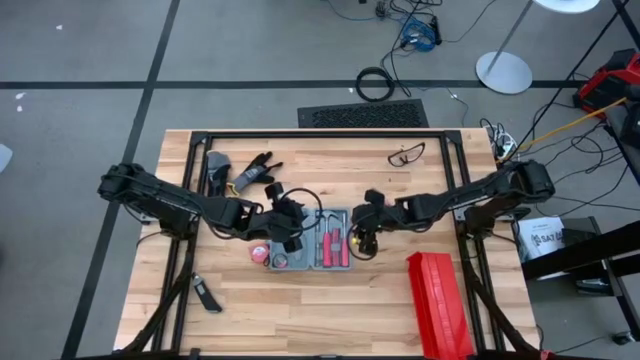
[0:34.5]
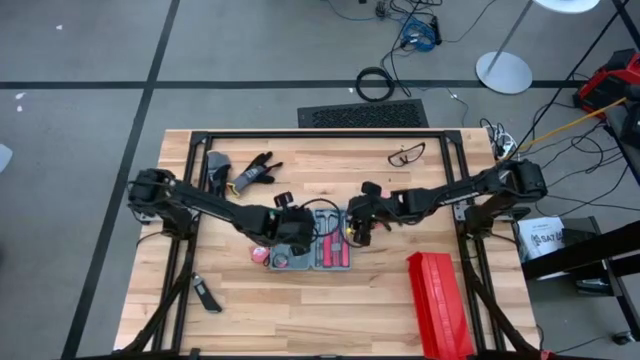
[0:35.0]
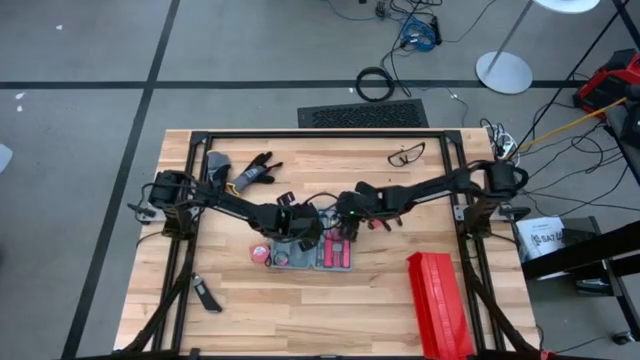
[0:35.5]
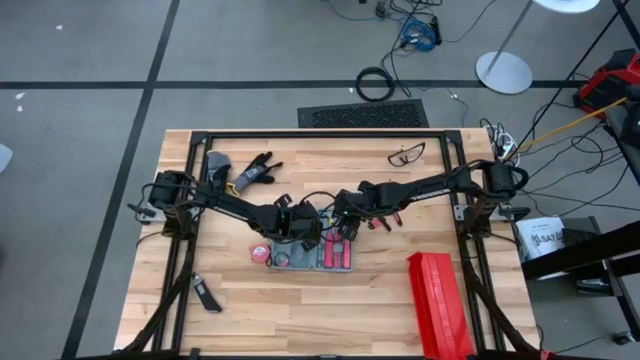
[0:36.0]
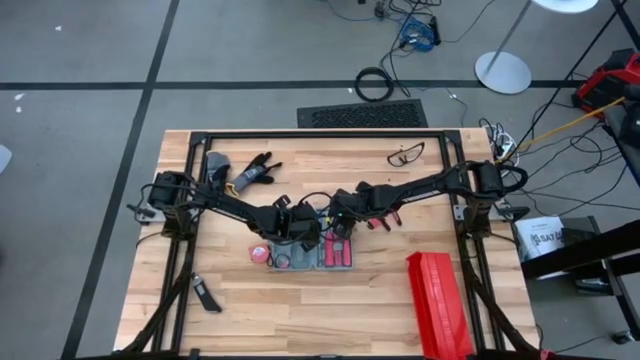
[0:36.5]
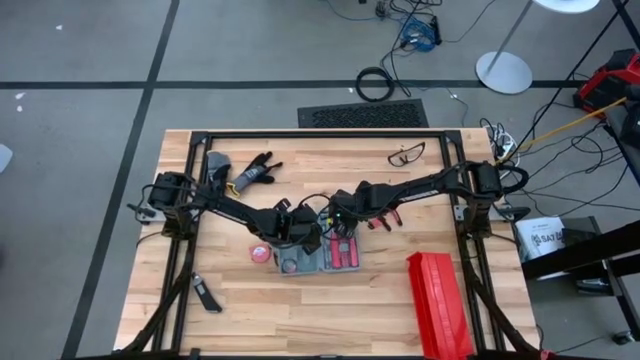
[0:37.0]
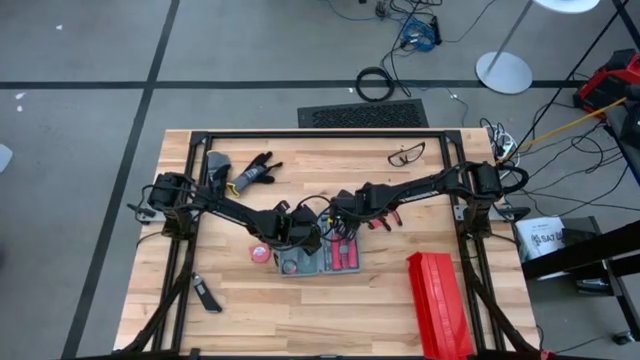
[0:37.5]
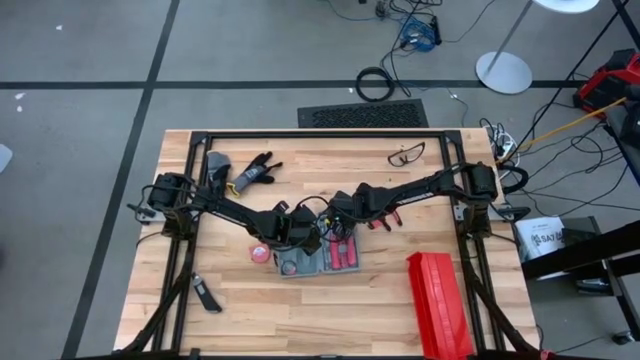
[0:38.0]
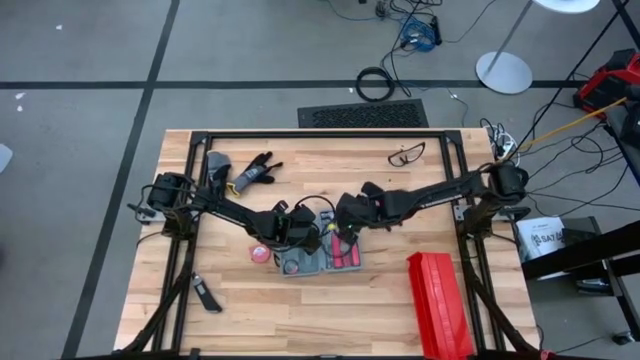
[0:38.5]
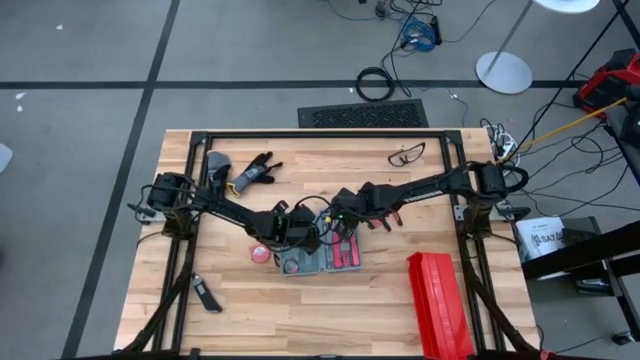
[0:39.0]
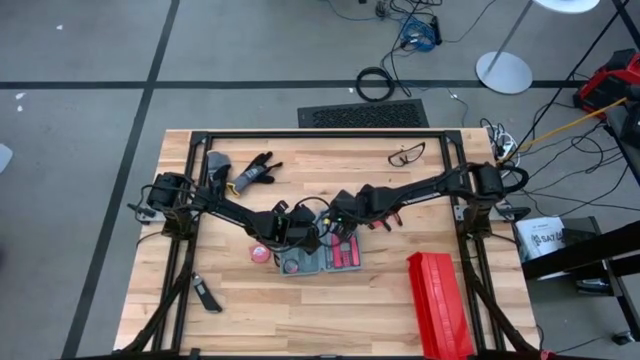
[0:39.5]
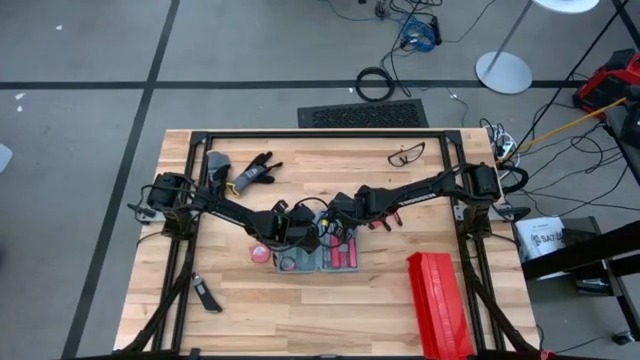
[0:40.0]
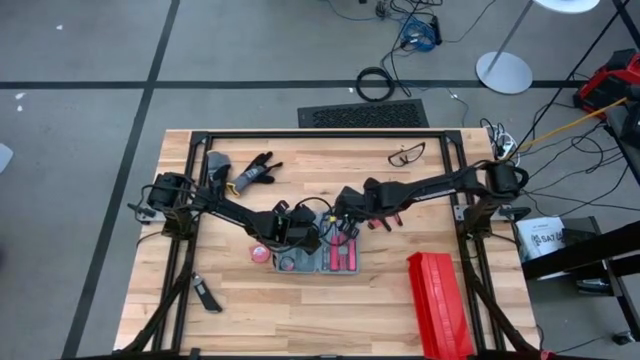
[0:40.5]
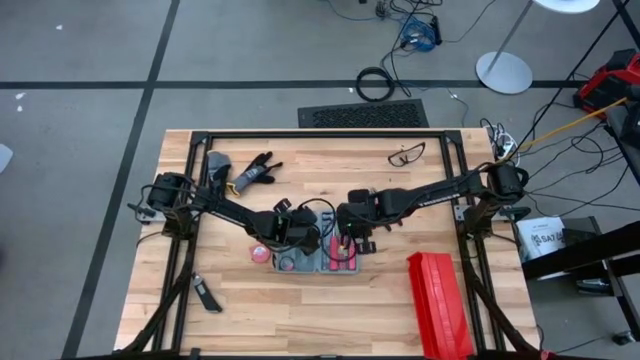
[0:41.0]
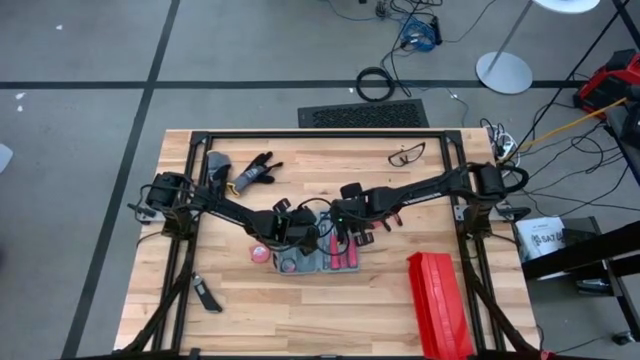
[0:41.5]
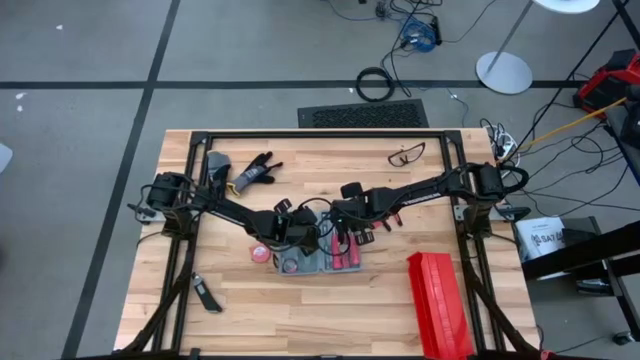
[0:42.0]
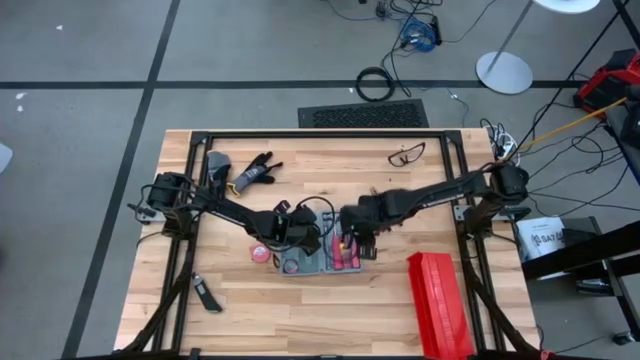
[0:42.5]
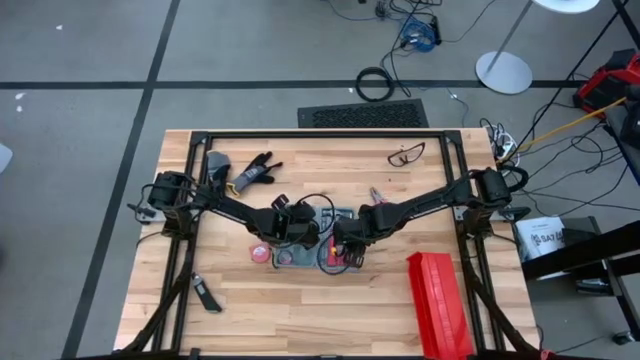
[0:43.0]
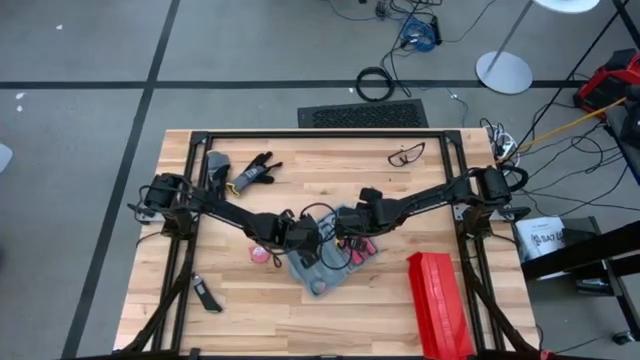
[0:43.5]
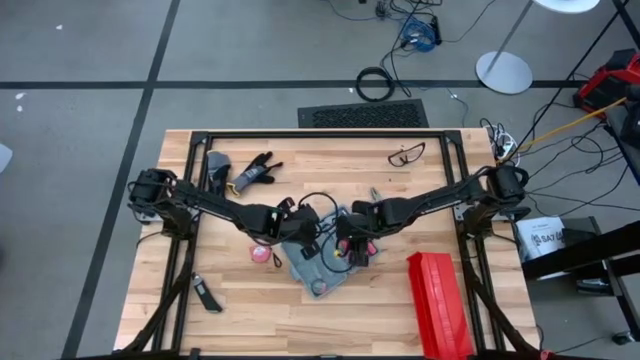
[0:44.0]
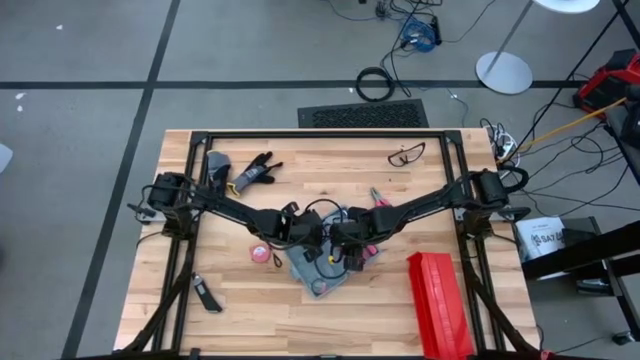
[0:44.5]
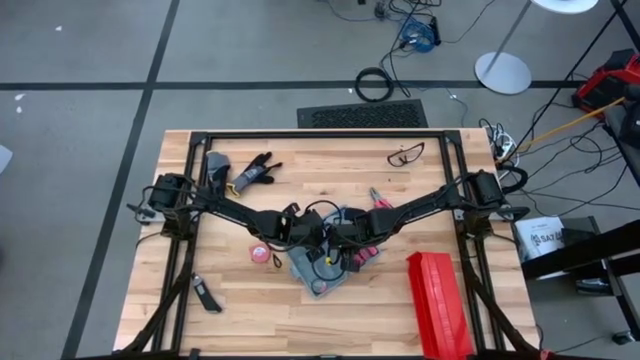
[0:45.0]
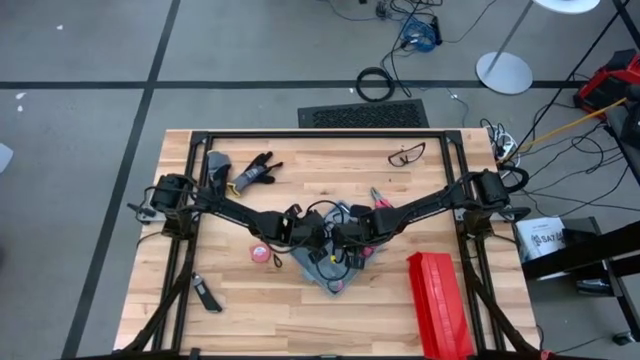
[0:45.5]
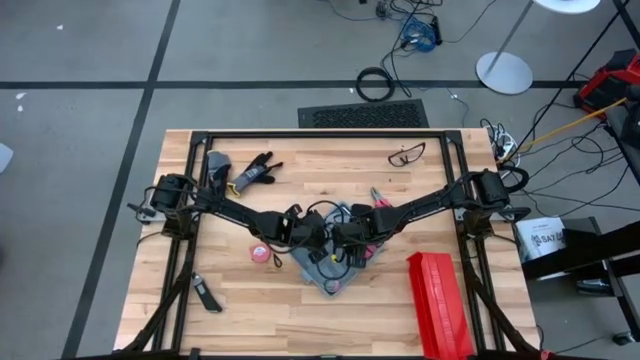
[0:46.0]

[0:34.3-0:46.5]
Task: prefit tool cases
Remove the red hammer from the gray prefit tools case

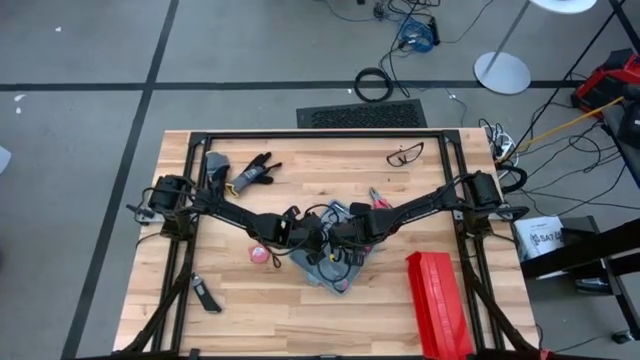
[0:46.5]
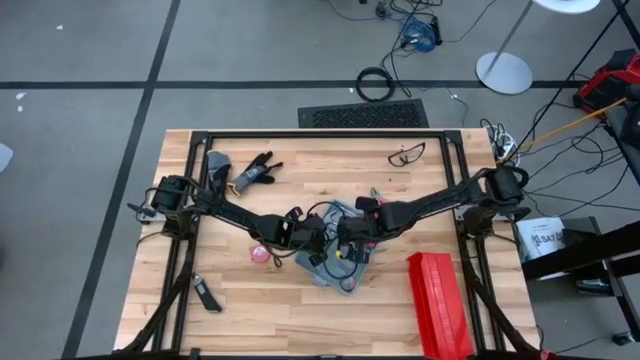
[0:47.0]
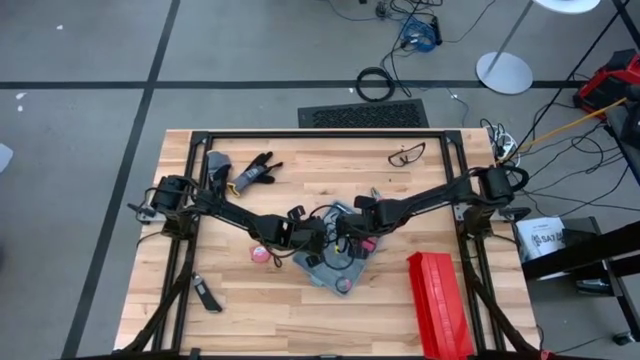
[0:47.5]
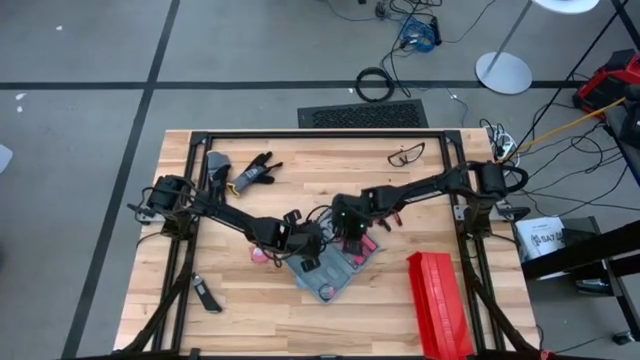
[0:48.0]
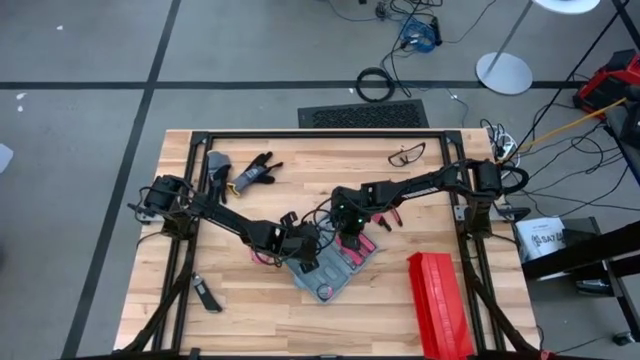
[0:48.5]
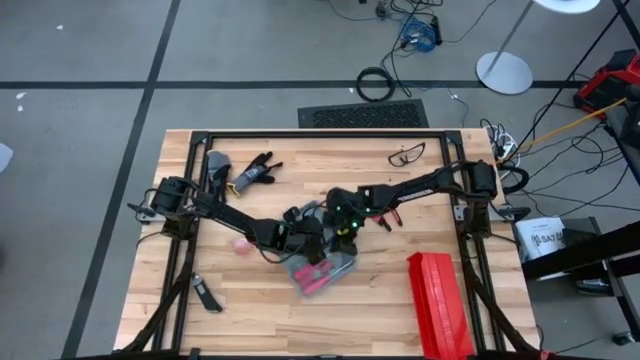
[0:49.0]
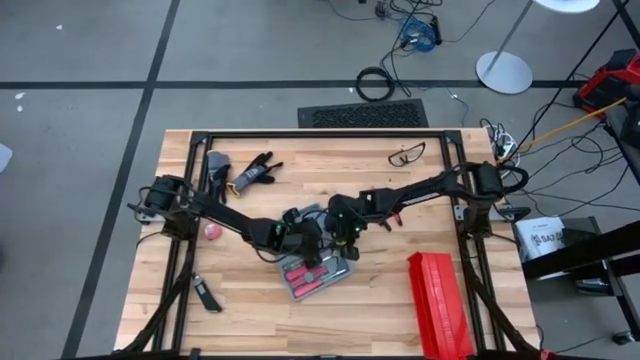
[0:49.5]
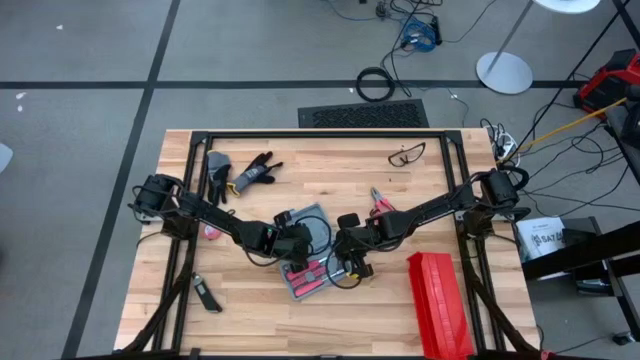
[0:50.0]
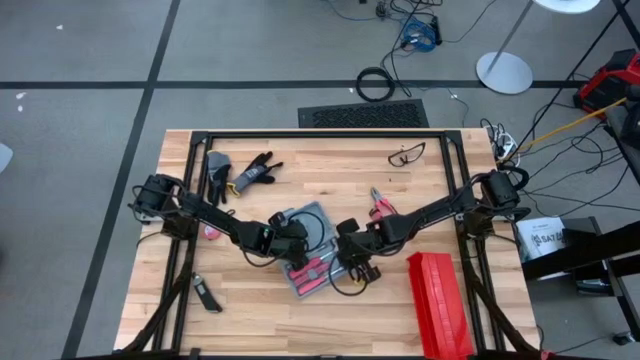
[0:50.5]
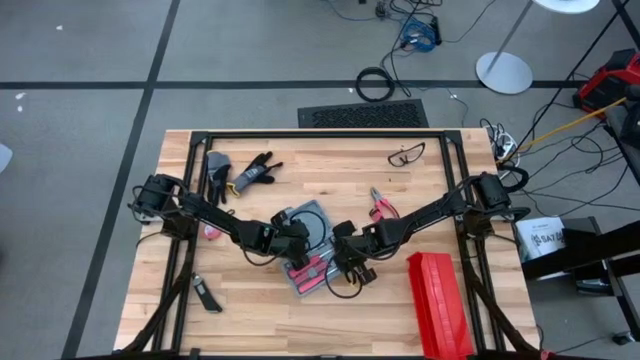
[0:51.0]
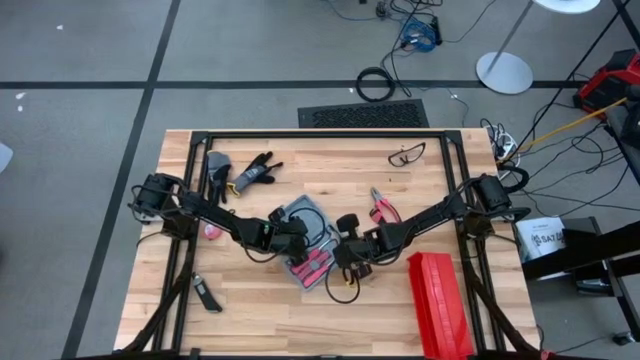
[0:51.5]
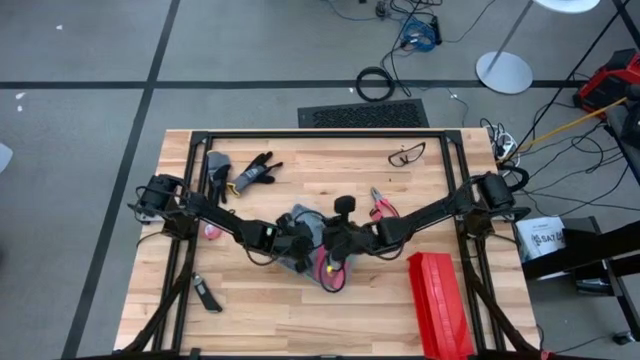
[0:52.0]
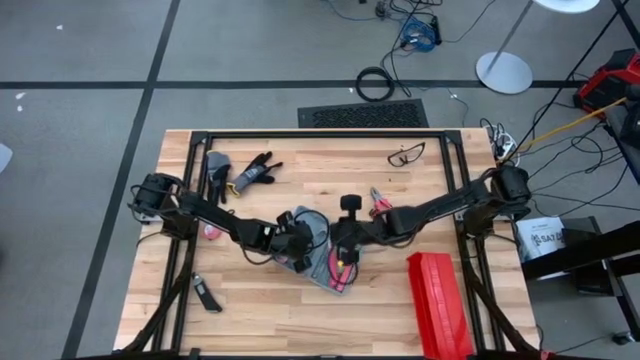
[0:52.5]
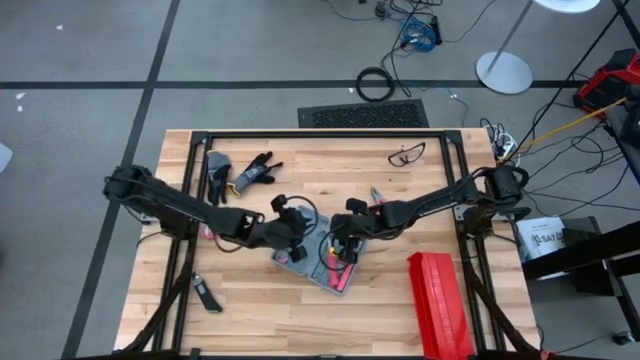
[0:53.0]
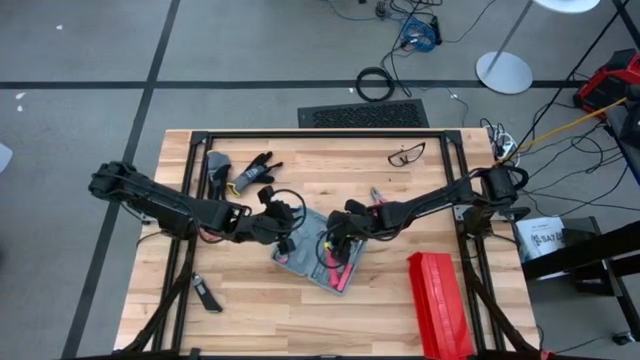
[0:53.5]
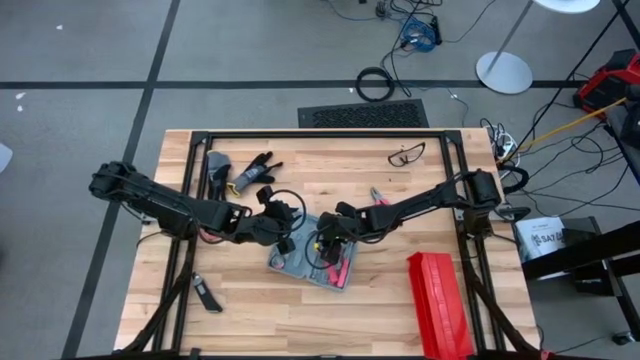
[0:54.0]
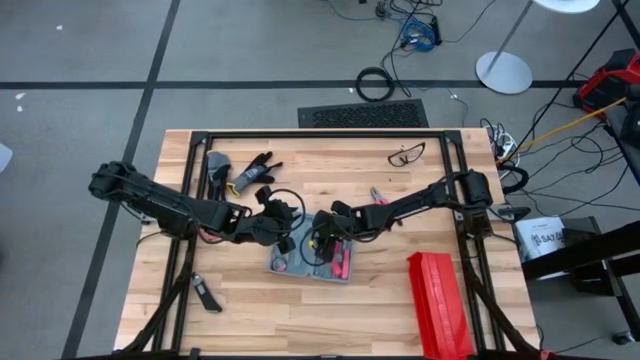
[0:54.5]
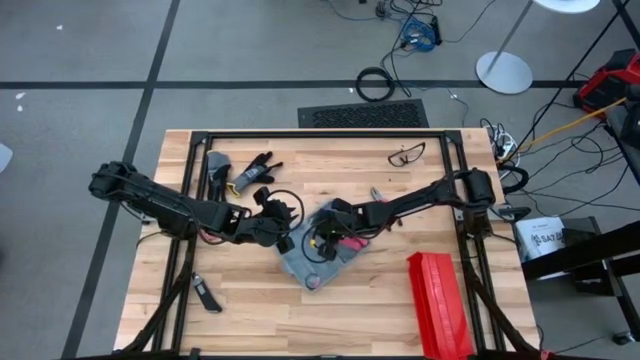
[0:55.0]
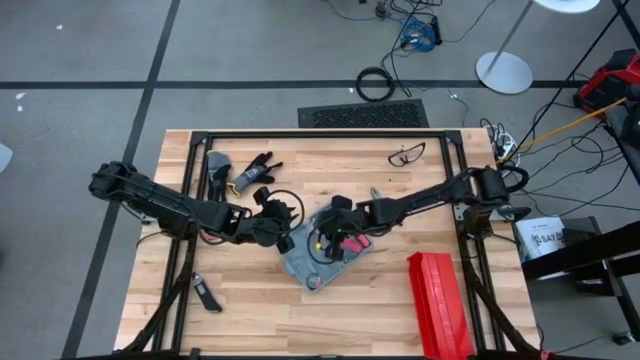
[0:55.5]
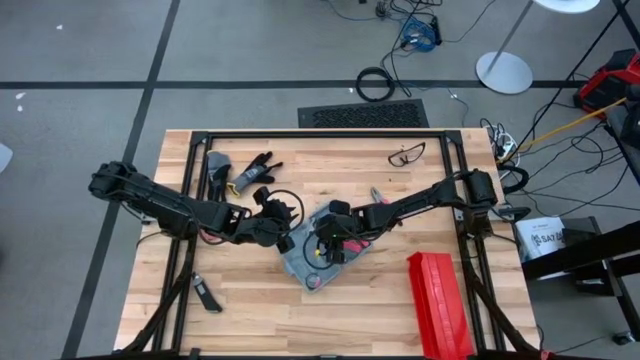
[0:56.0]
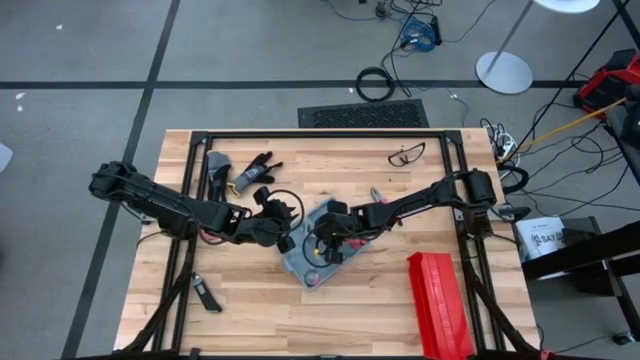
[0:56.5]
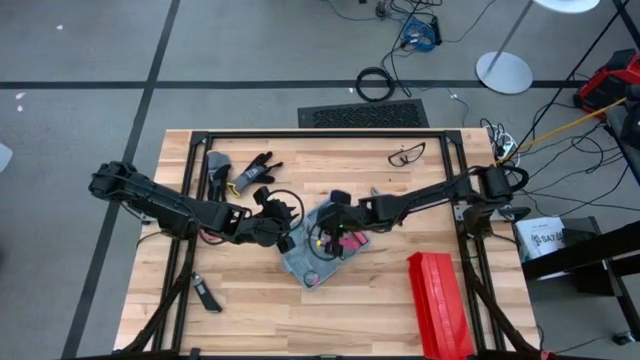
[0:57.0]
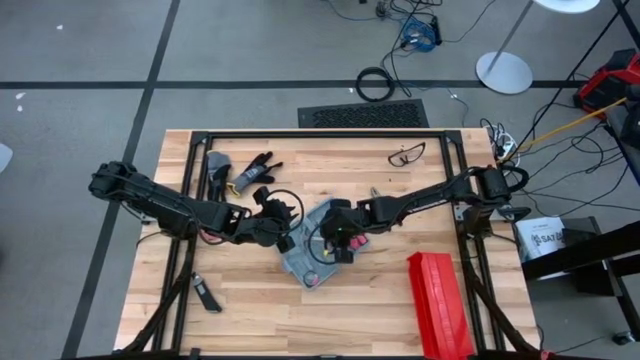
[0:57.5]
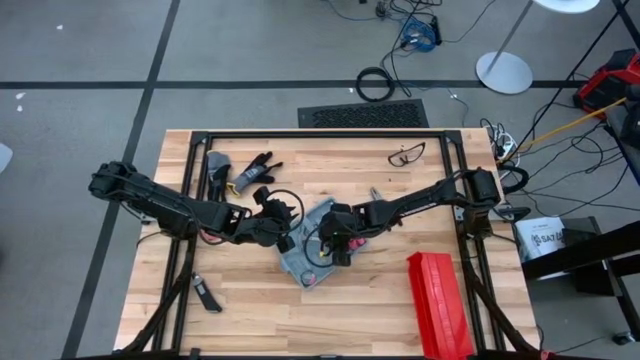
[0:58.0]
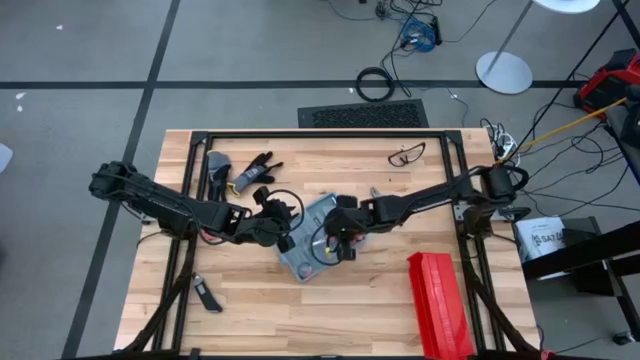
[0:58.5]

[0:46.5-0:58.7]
Remove the red hammer from the gray prefit tools case
